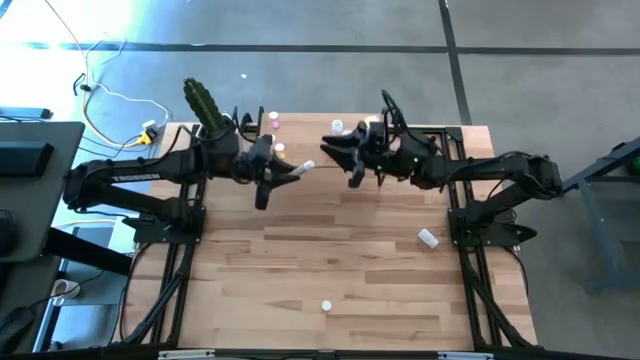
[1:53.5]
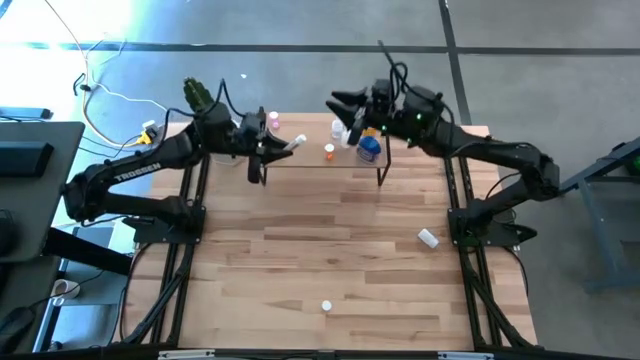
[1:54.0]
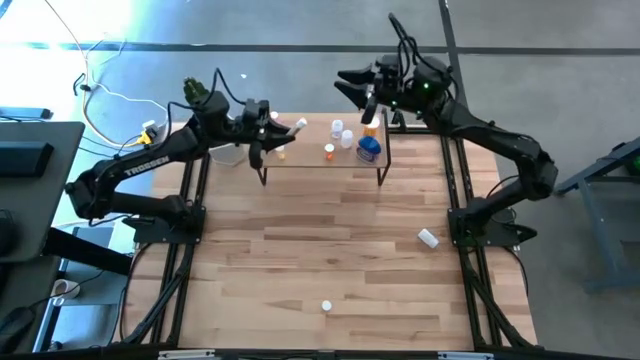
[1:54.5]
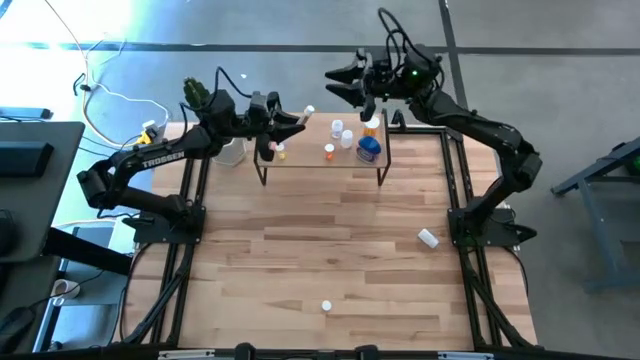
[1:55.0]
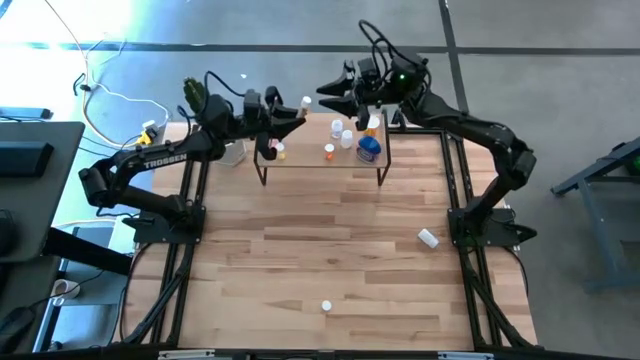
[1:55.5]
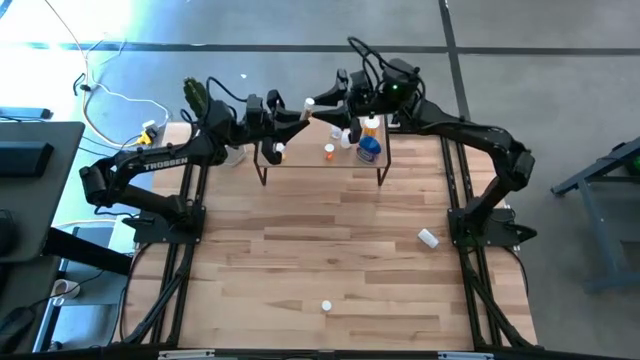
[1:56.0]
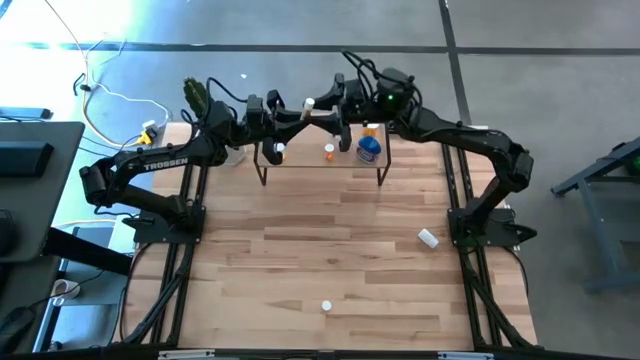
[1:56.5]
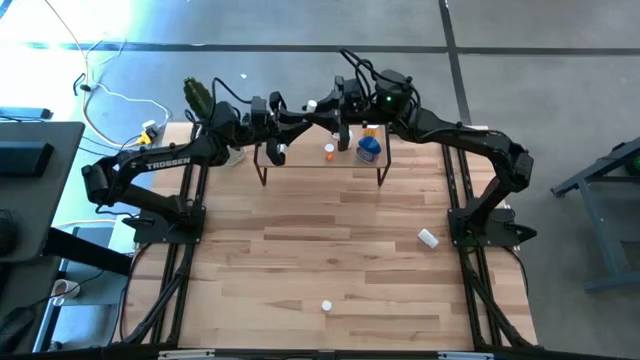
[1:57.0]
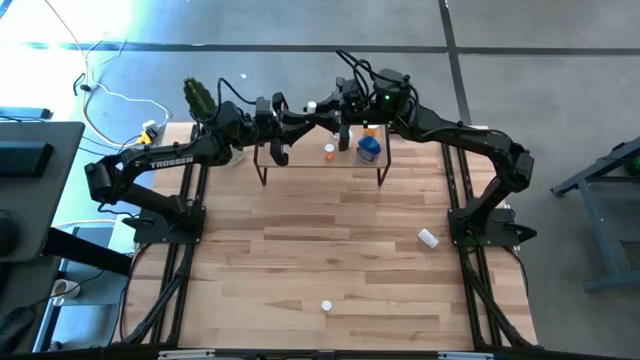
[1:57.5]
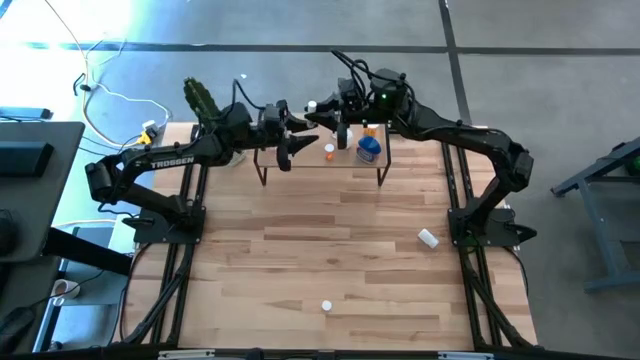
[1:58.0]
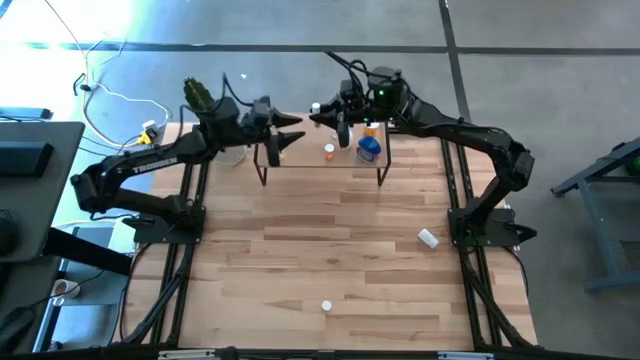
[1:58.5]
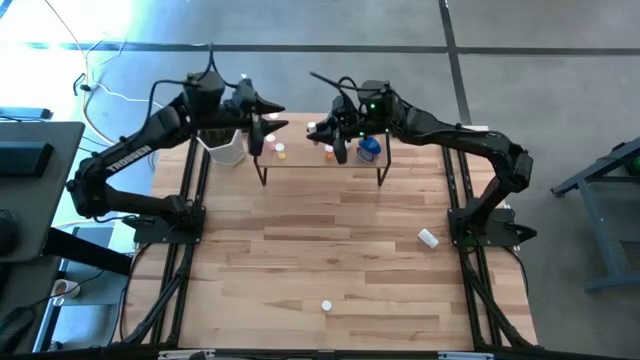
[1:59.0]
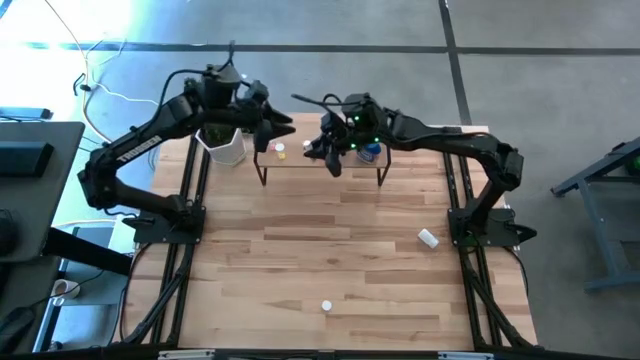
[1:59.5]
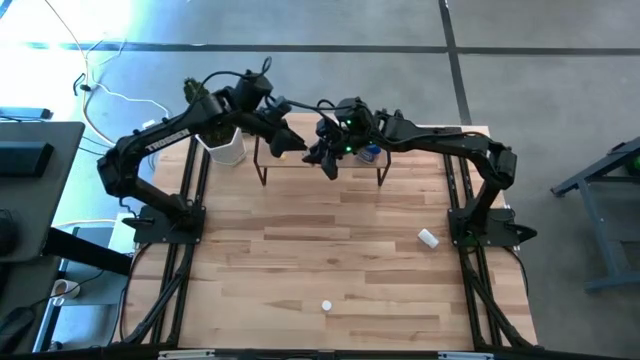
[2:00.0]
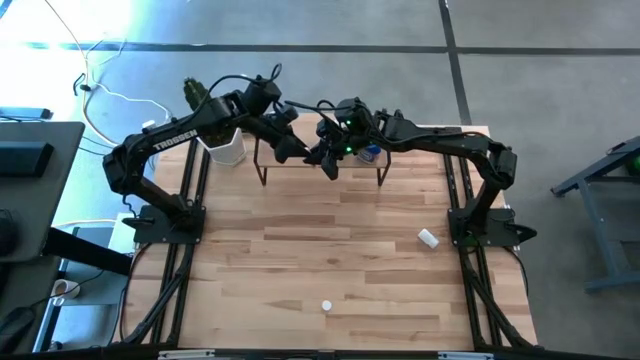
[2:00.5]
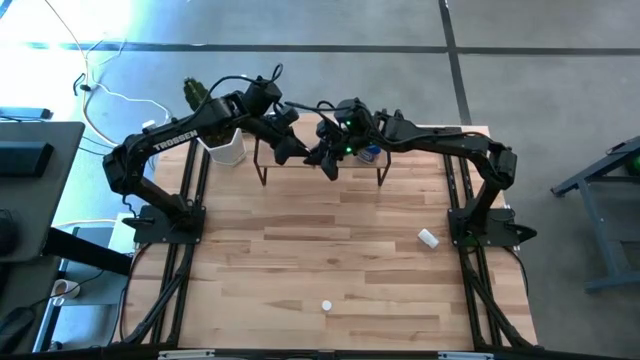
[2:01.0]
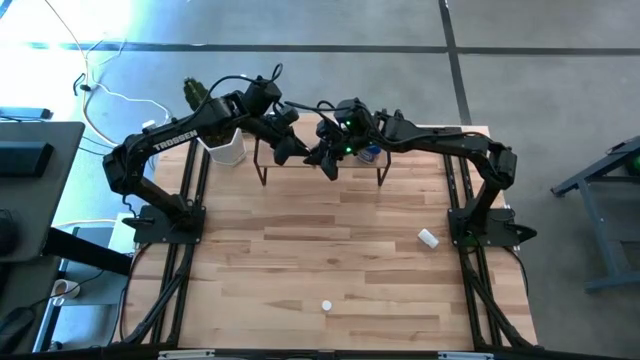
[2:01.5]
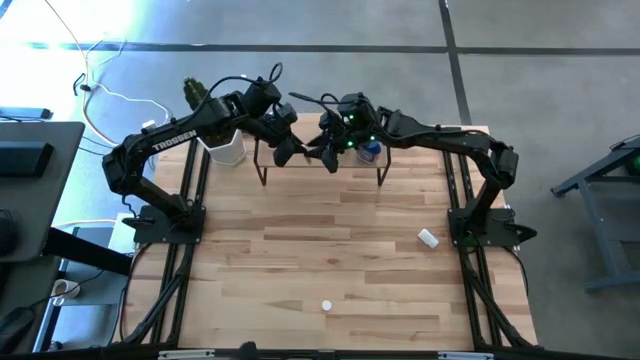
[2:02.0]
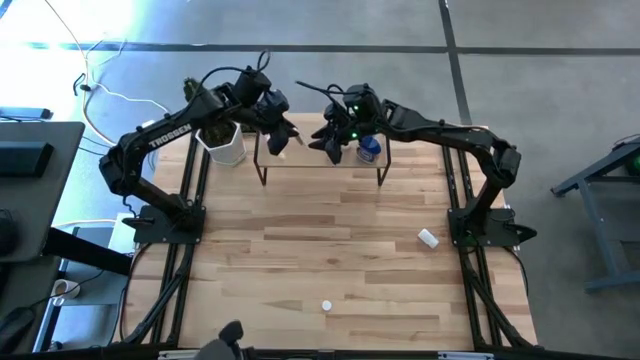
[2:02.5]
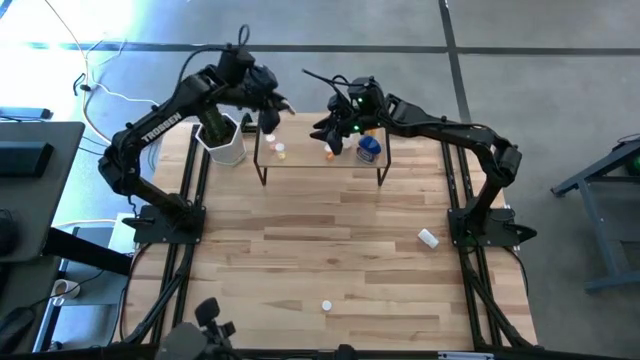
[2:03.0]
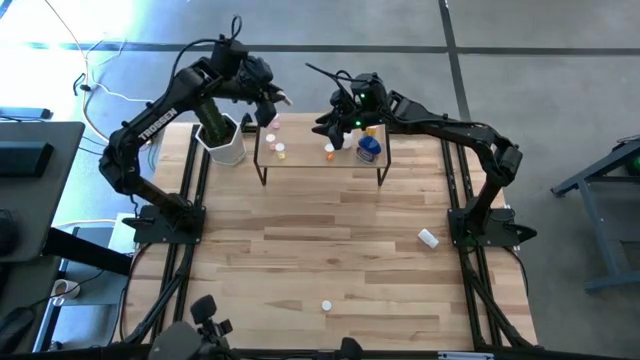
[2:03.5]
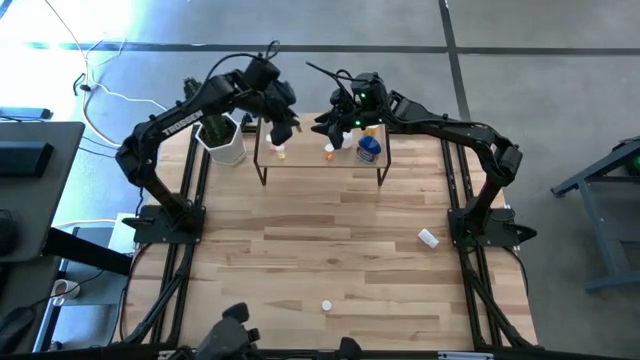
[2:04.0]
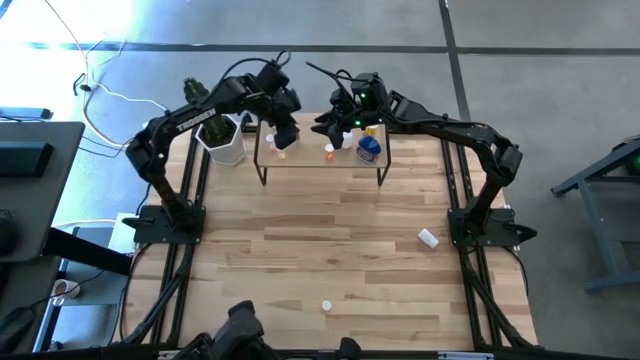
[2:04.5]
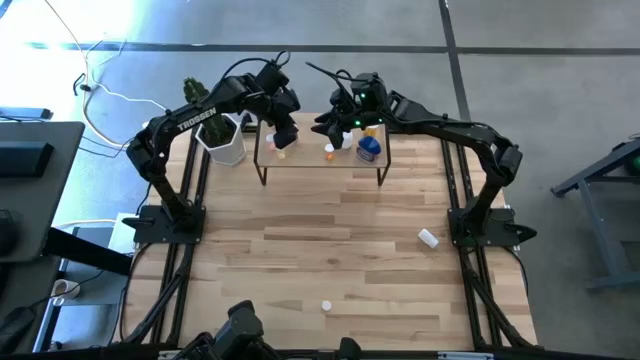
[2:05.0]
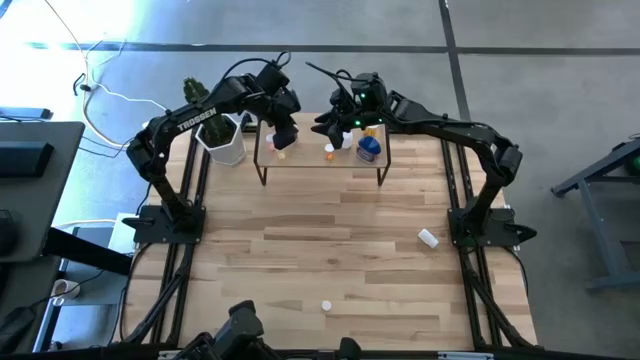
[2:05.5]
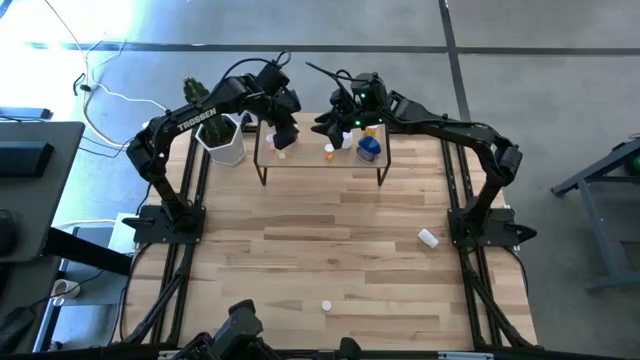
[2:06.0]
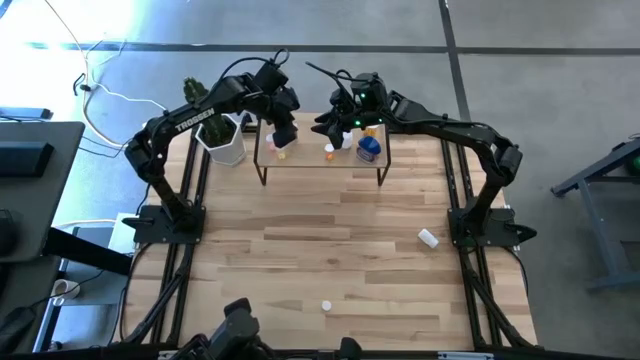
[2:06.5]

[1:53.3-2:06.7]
Task: Pick and place medicine bottles onto shelf by color
Put the top white pill bottle on the shelf

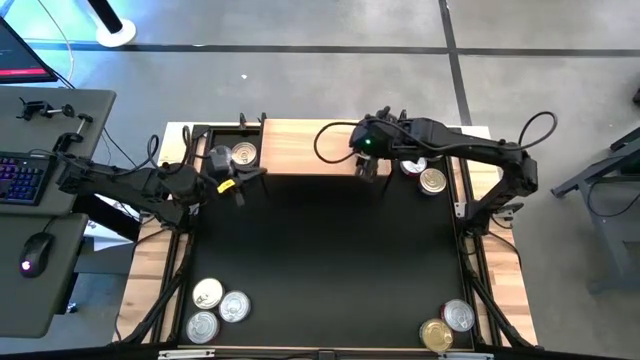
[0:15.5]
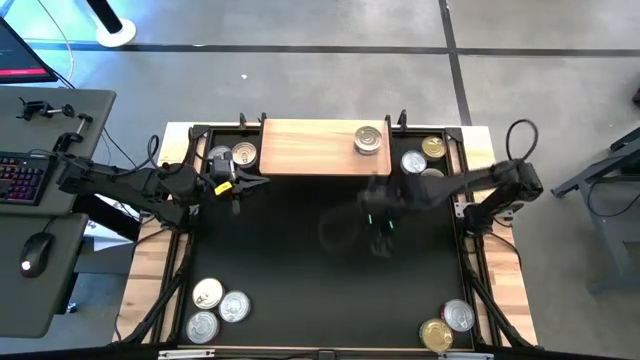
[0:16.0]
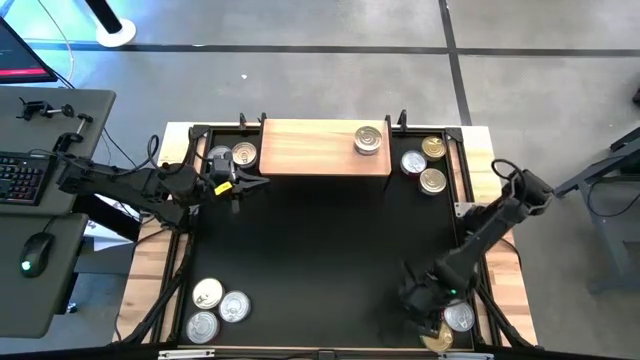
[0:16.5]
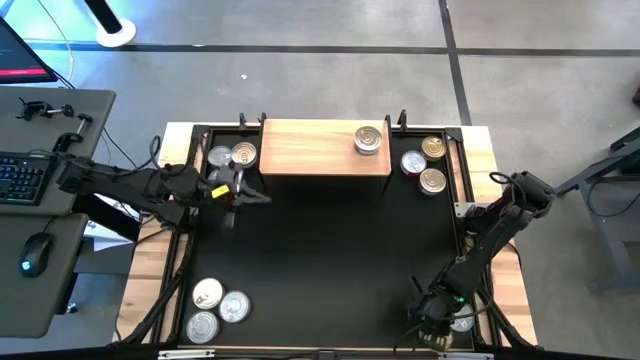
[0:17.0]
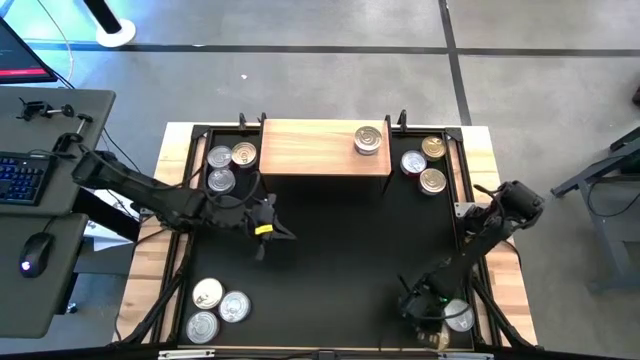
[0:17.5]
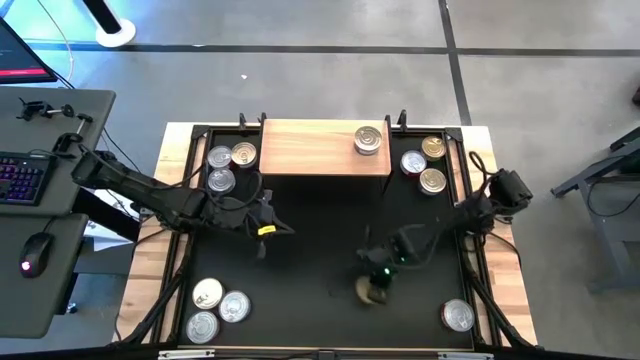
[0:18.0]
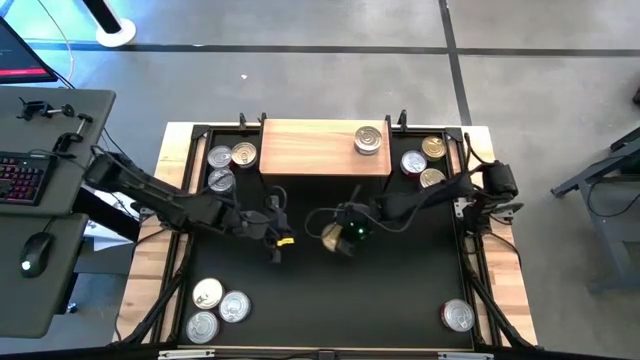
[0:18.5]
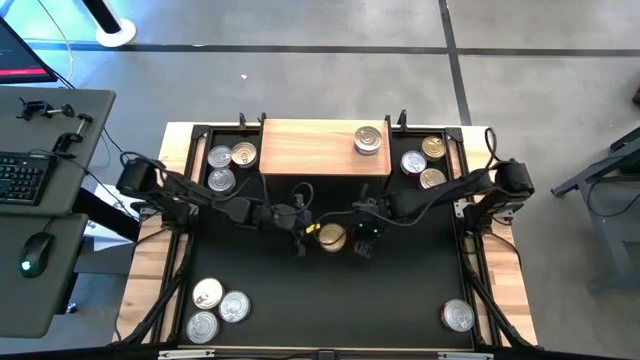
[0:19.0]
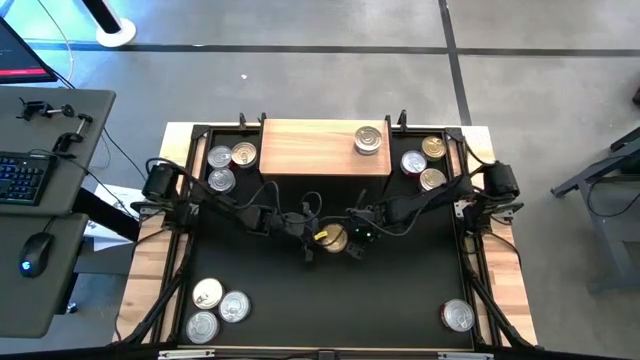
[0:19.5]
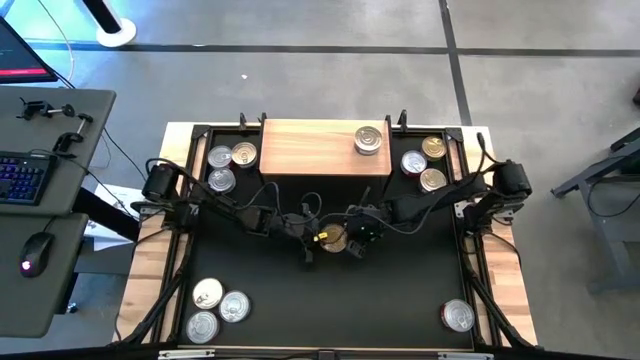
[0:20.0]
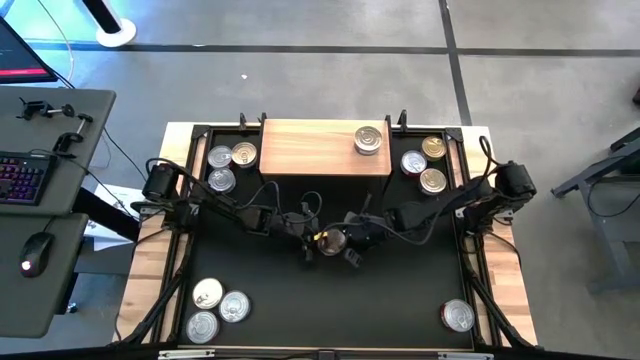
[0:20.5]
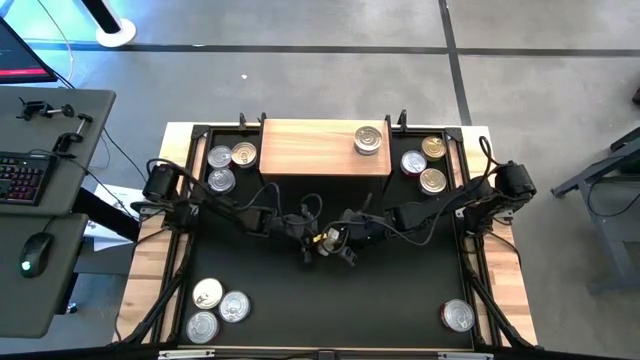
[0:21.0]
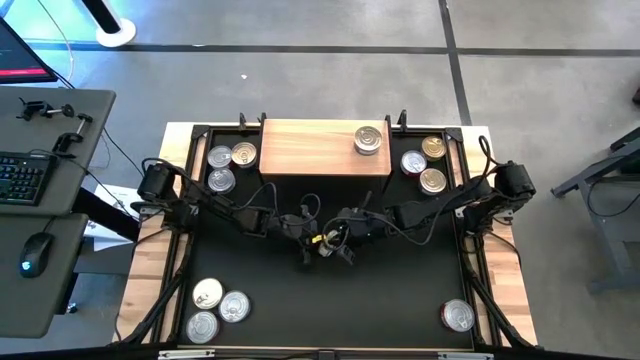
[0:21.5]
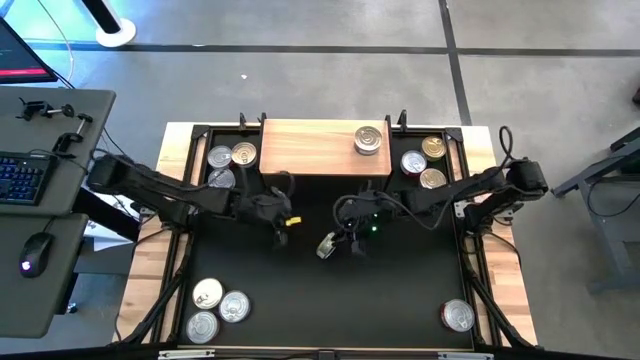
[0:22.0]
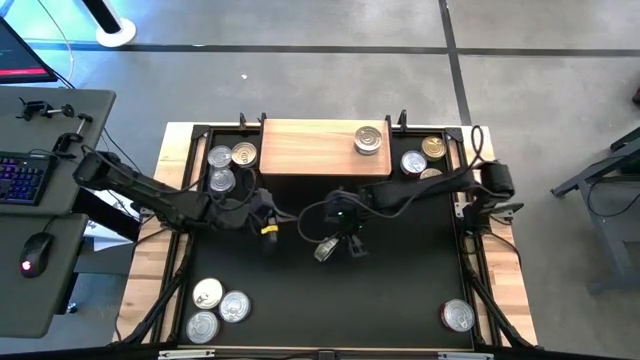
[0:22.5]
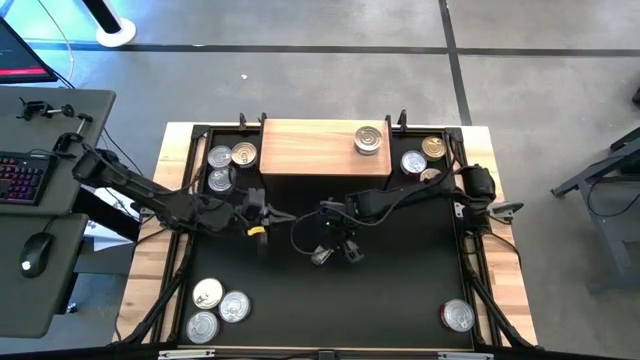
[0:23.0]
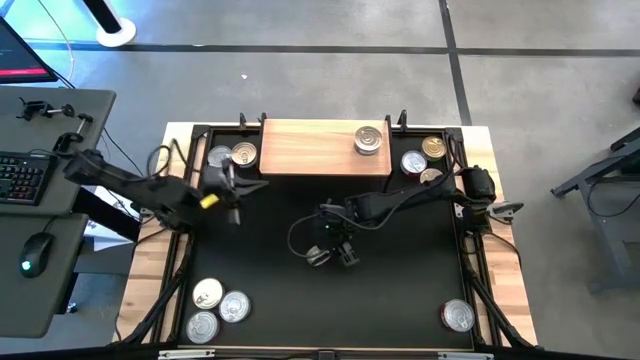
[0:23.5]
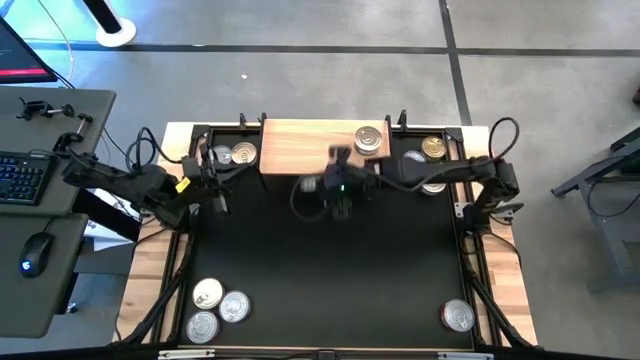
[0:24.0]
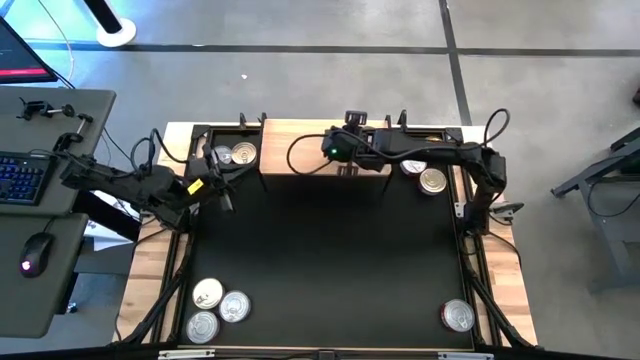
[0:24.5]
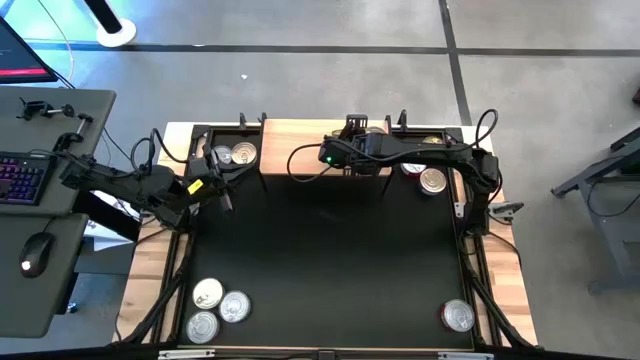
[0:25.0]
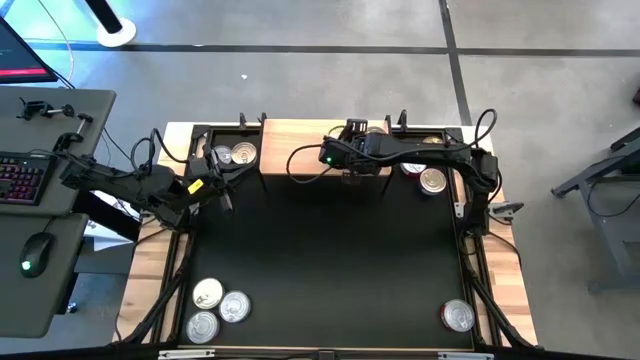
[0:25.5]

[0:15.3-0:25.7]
Task: Stack canned seafood by type on shelf
Put the bottom green tuna can on the shelf
